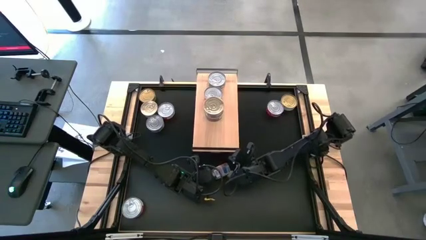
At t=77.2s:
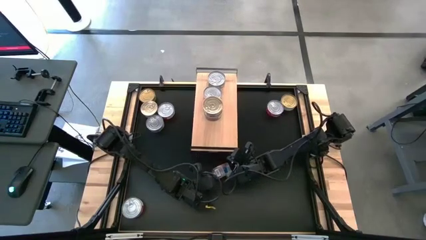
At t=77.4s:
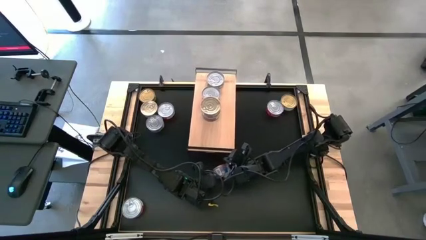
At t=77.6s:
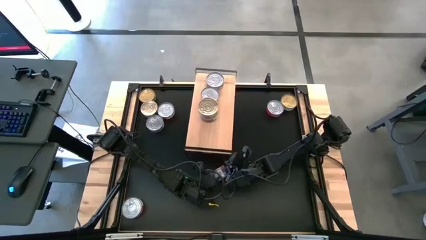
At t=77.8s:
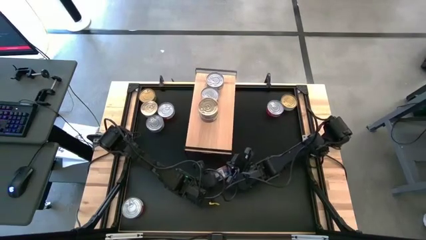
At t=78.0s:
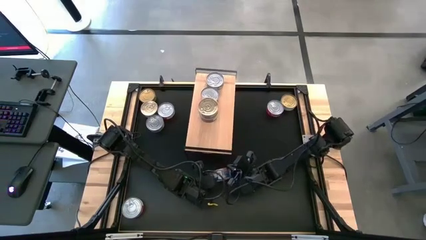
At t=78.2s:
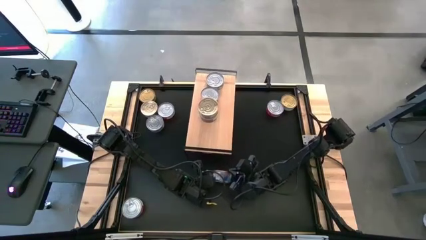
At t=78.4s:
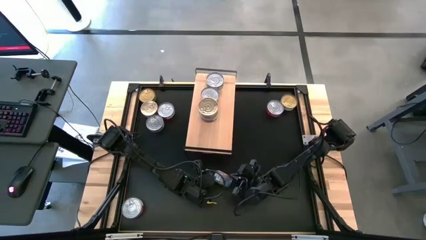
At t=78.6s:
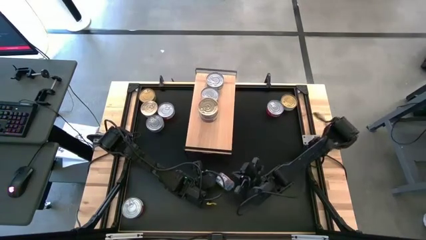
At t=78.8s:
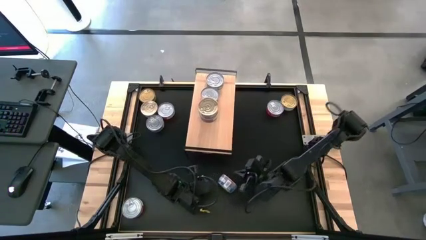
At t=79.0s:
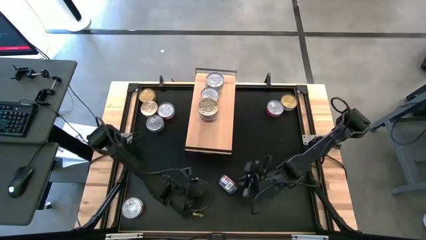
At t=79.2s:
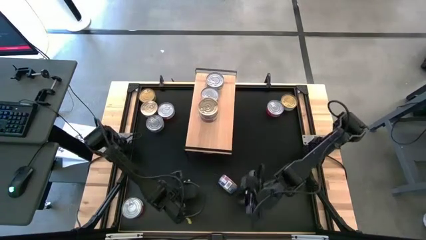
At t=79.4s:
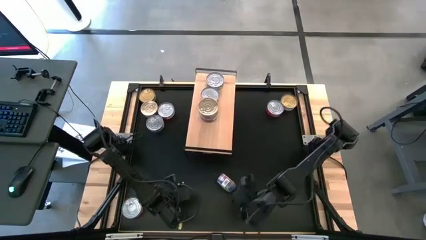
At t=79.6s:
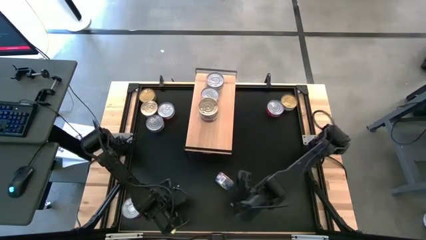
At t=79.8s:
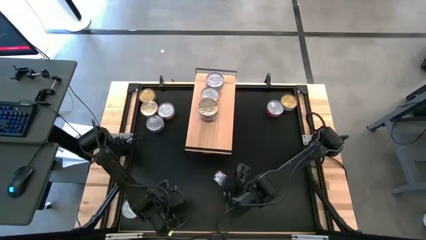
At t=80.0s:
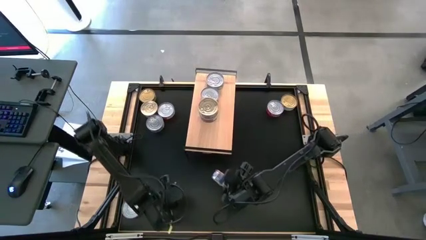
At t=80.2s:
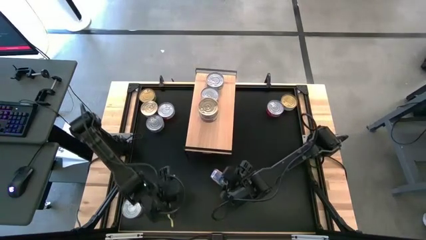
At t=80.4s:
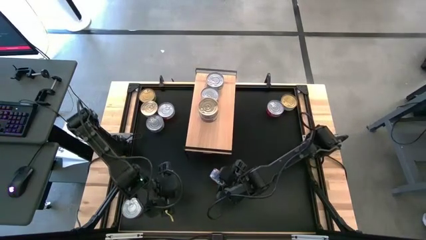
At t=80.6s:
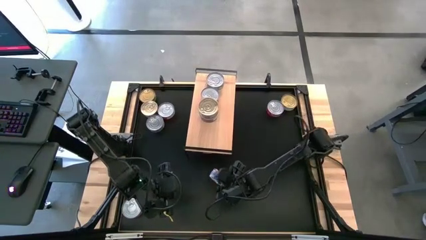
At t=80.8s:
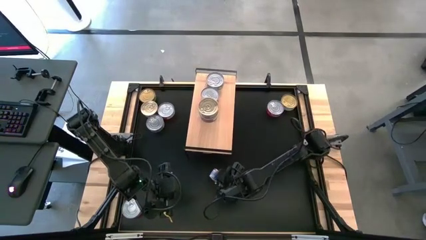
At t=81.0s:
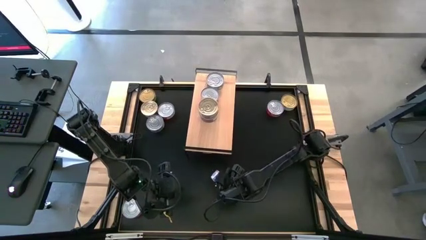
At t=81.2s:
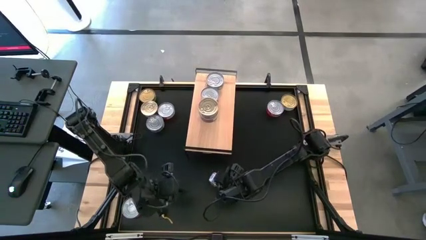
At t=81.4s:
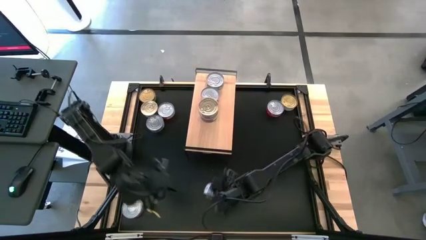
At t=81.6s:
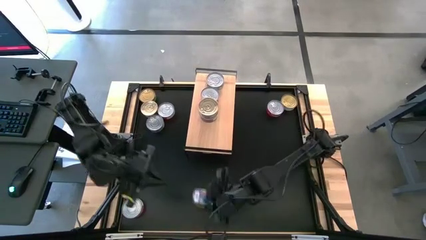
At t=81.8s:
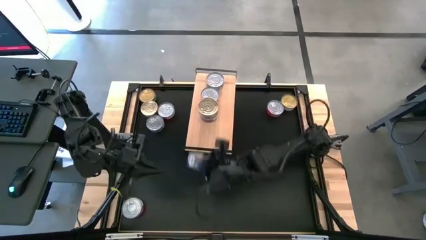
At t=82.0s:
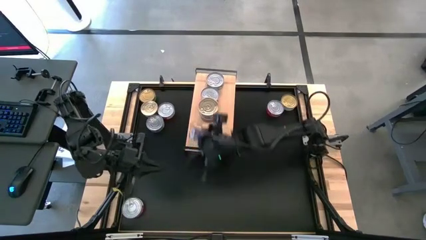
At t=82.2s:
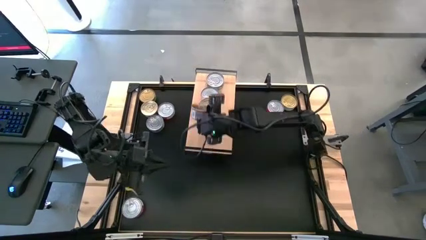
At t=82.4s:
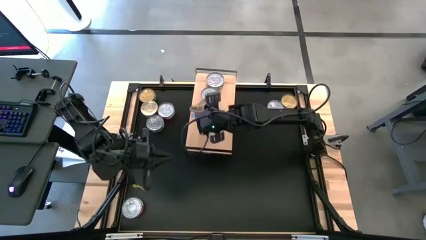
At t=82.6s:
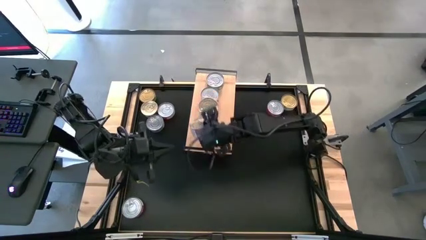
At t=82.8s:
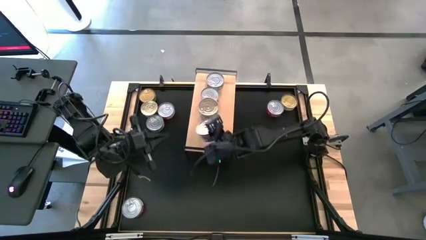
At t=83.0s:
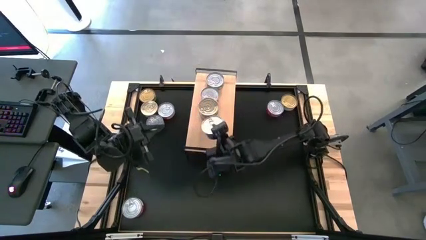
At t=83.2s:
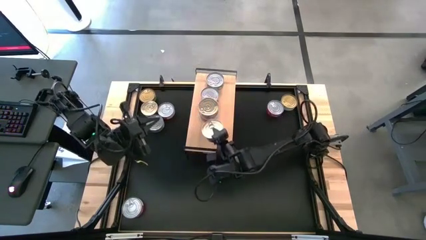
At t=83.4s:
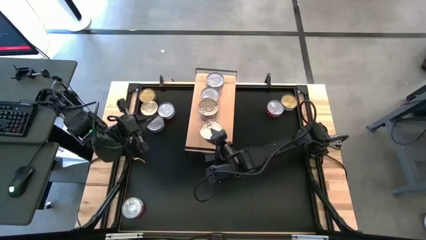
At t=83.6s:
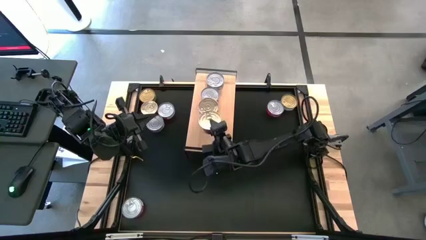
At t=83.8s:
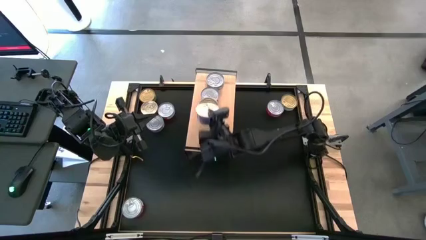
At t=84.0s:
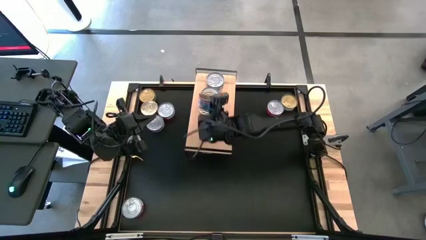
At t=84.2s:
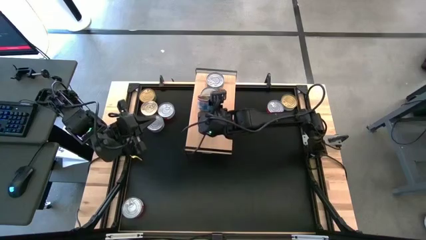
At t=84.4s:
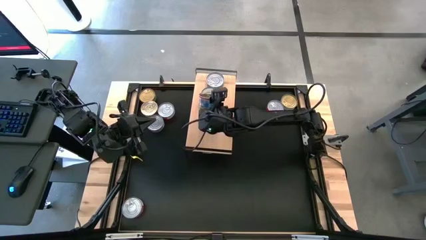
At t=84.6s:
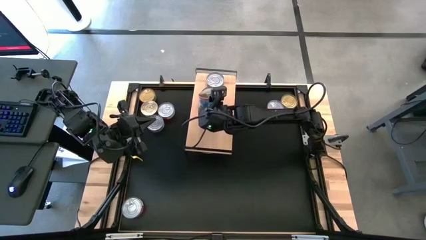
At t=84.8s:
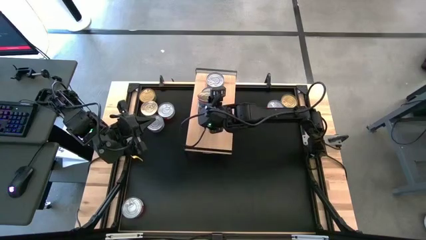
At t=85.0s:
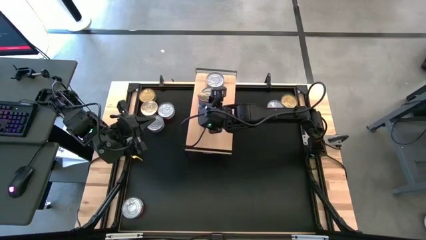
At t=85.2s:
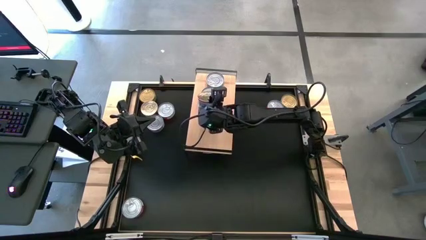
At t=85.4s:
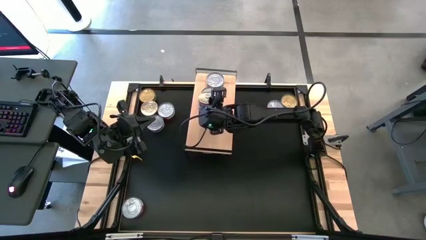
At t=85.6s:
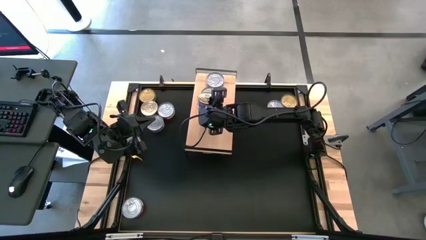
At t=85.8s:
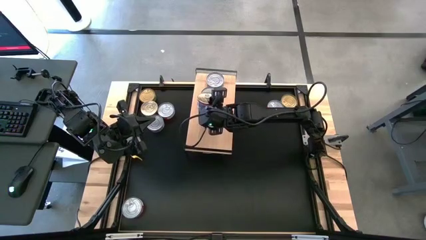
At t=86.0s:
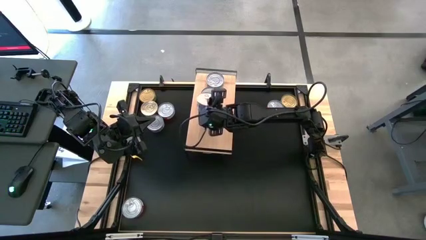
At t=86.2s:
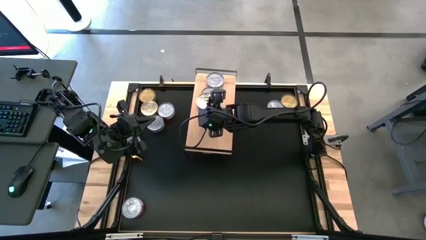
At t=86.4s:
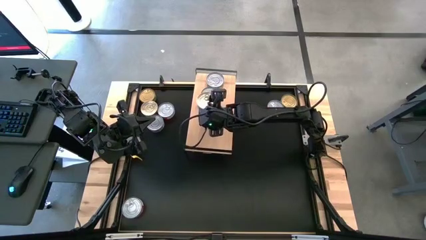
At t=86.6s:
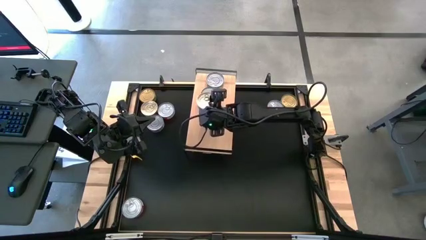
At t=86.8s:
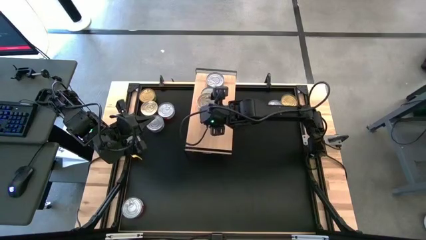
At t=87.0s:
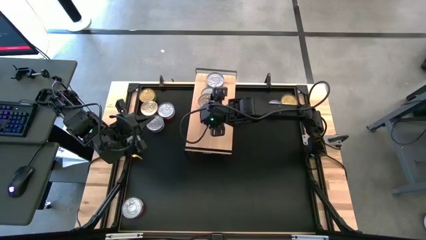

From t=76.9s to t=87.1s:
Task: Stack canned seafood by type on shelf
Stack the blue pink tuna can on top of the blue pink tuna can on the shelf

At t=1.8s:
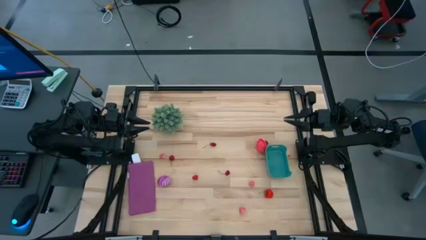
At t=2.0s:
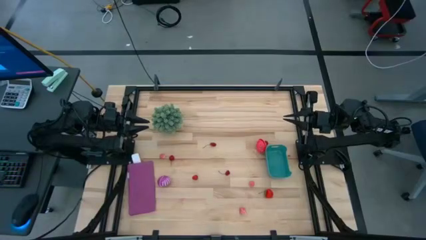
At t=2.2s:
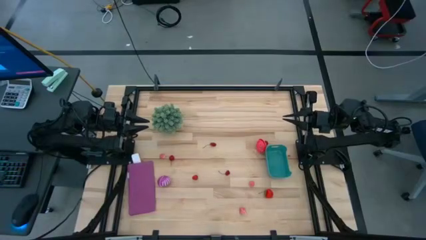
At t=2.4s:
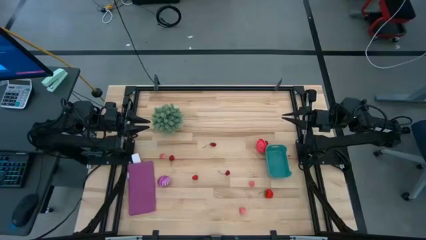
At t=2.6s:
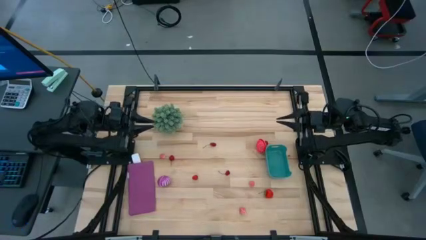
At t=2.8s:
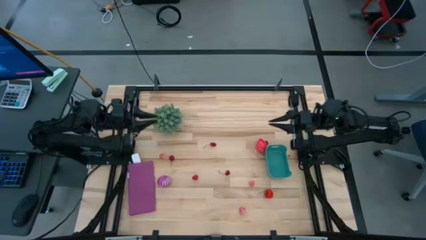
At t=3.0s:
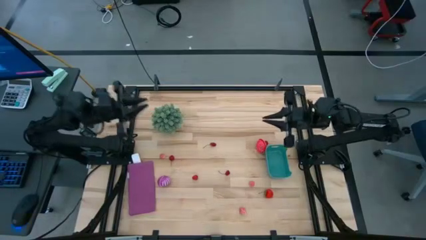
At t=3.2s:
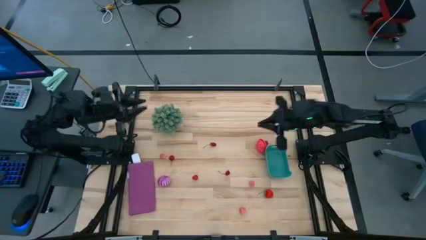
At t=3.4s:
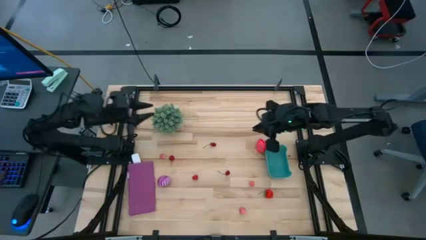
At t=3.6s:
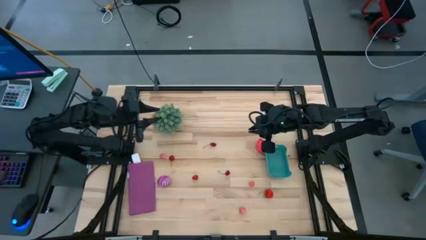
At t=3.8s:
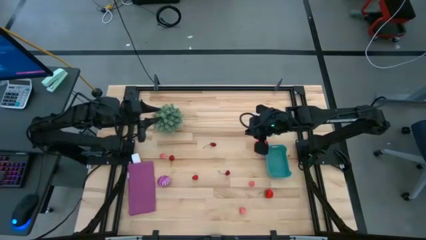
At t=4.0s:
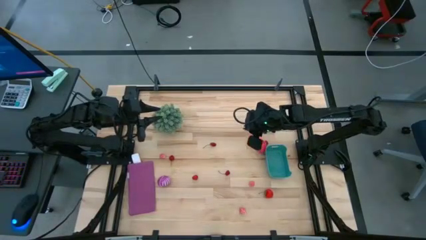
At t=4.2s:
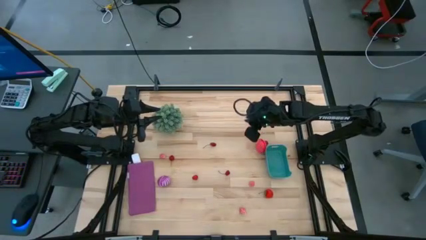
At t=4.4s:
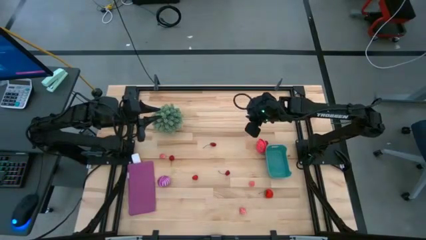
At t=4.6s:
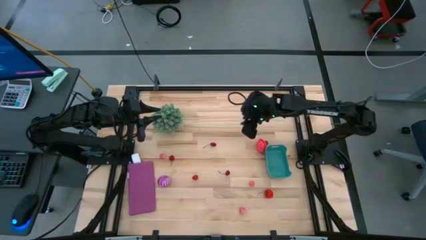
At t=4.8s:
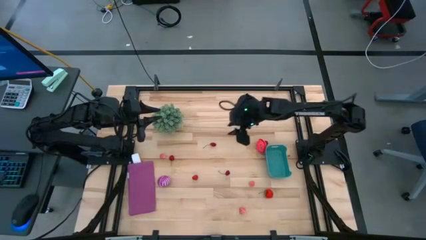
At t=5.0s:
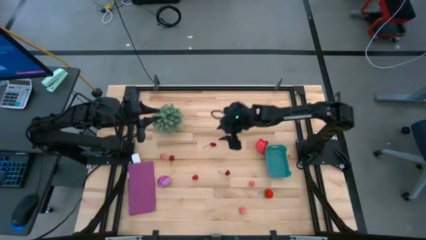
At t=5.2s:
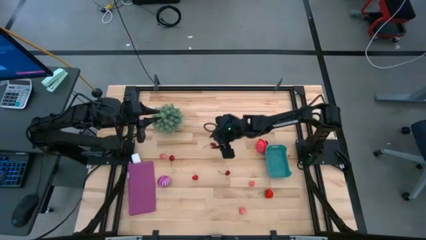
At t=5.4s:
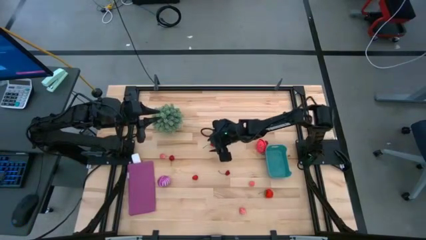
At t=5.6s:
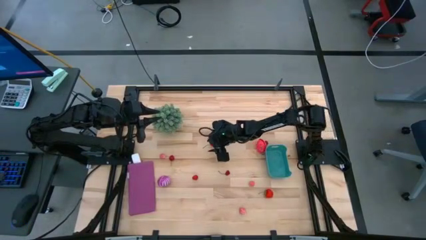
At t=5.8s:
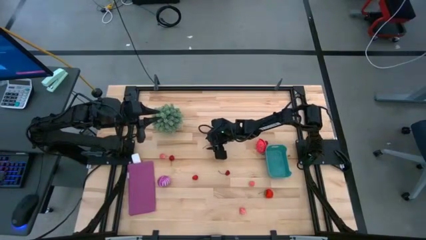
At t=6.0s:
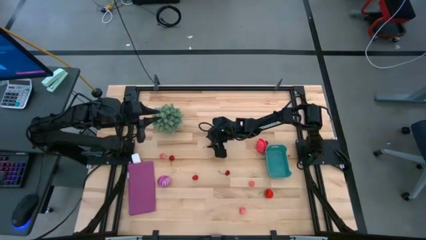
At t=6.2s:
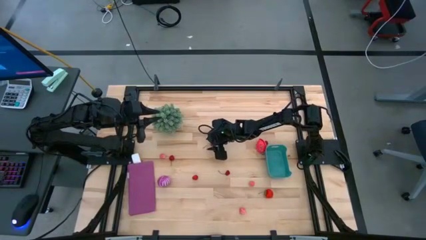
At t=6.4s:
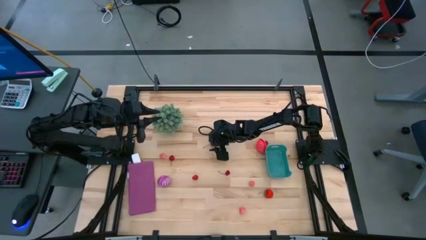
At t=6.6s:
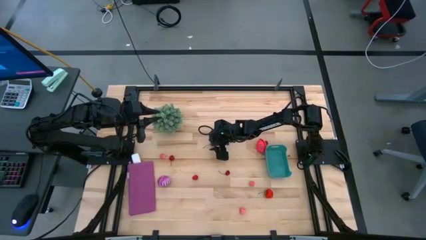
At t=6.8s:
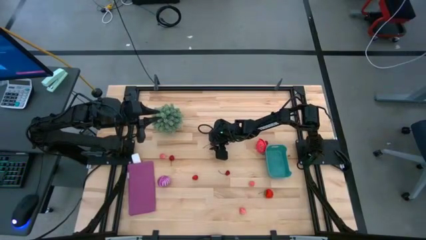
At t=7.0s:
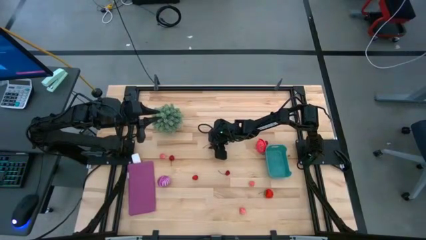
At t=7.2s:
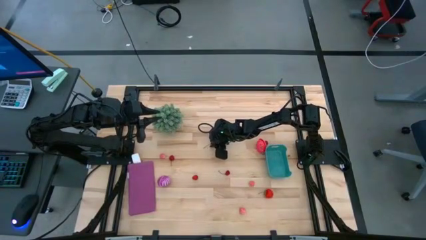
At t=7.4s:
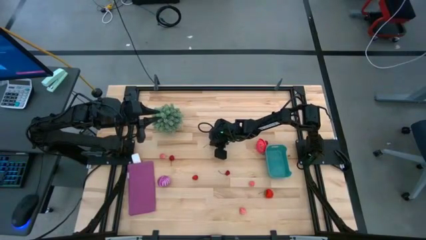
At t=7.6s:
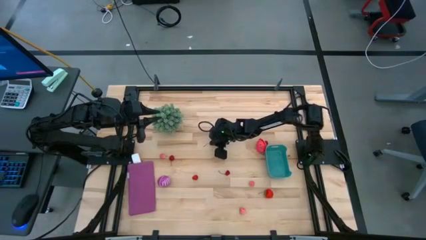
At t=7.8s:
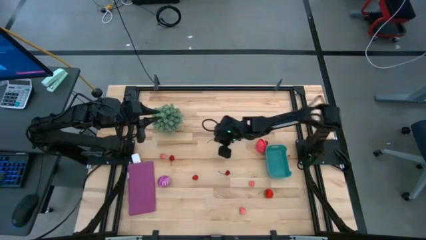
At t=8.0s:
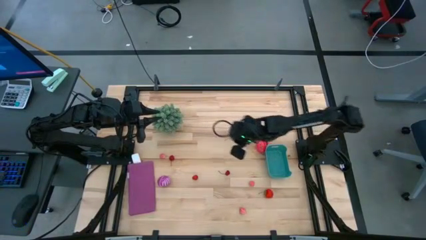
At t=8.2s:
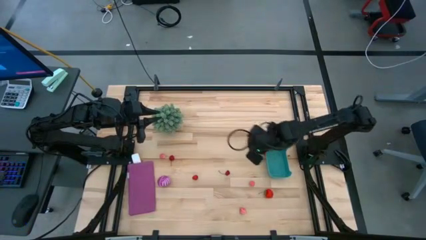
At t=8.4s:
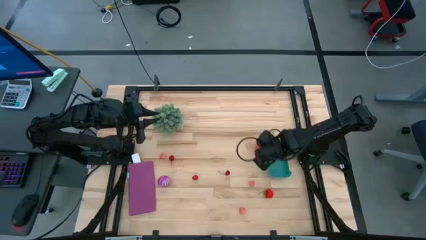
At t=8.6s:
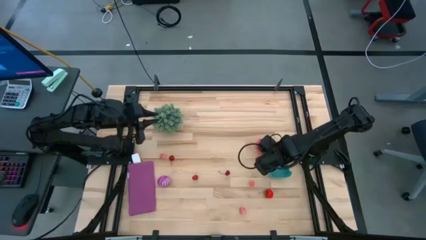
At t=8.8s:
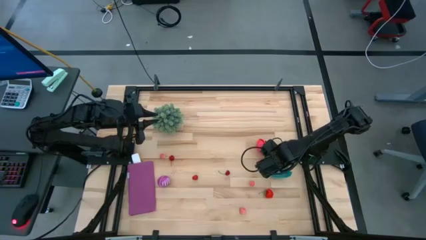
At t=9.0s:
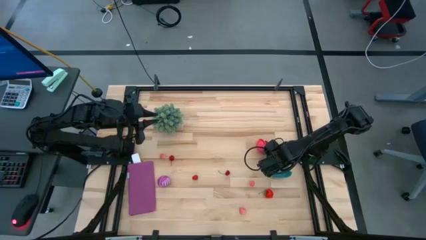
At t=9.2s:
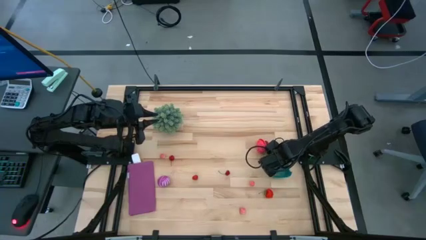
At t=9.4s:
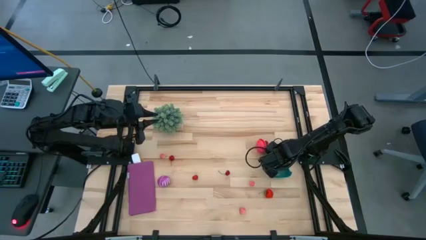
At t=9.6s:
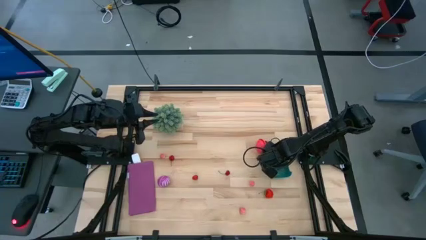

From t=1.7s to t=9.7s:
Task: Pick and placing Produce into tupperware
Put the red cherry into the green bin
